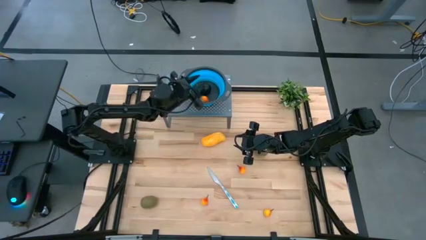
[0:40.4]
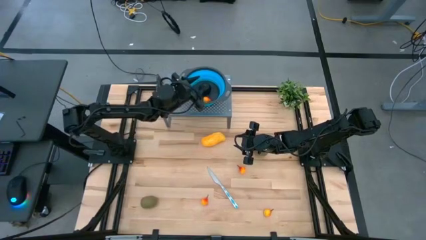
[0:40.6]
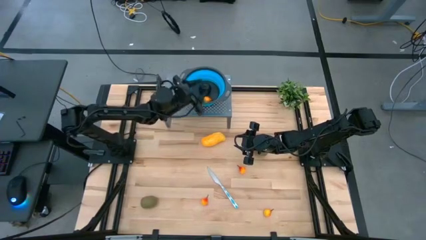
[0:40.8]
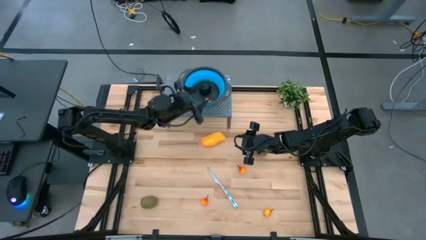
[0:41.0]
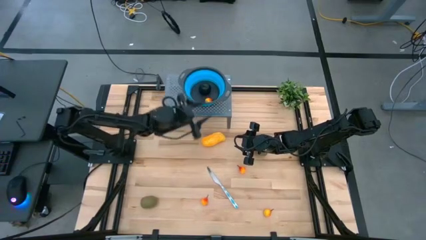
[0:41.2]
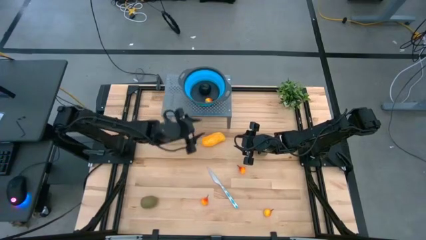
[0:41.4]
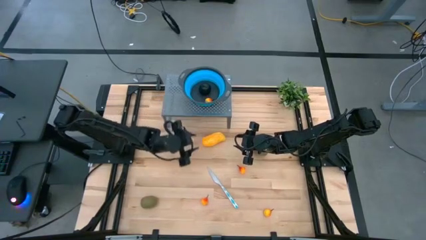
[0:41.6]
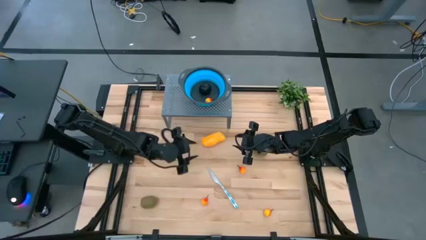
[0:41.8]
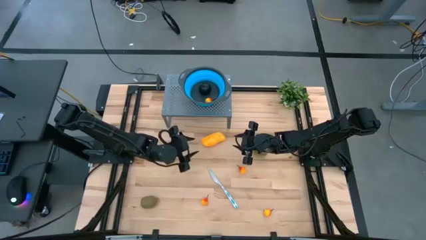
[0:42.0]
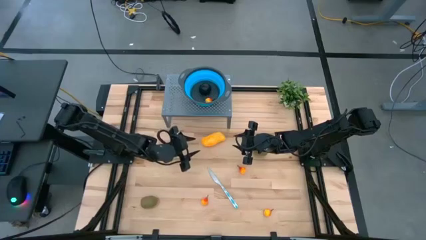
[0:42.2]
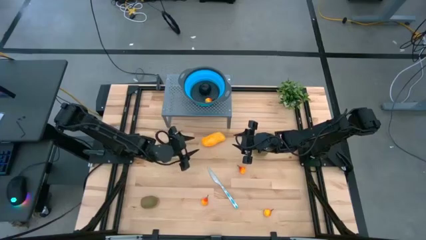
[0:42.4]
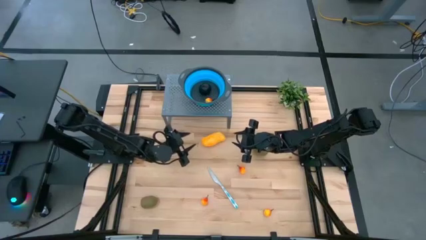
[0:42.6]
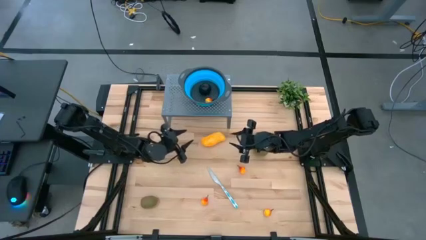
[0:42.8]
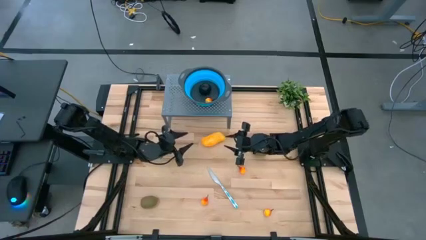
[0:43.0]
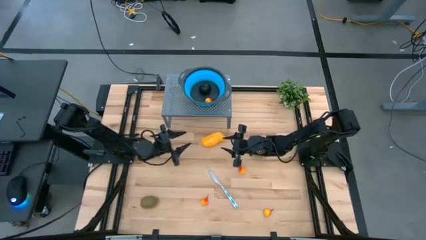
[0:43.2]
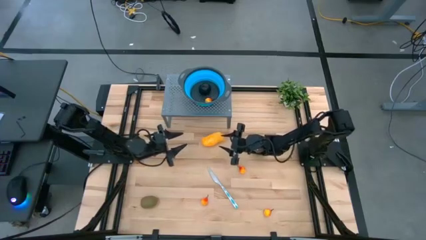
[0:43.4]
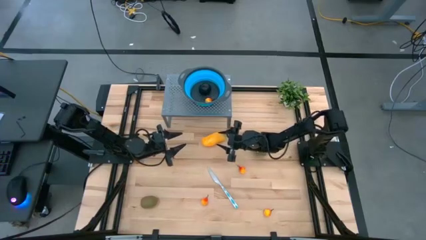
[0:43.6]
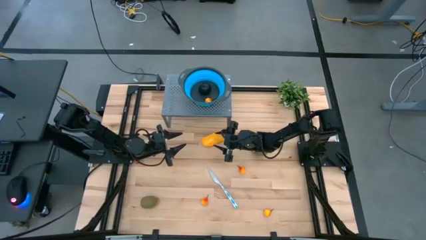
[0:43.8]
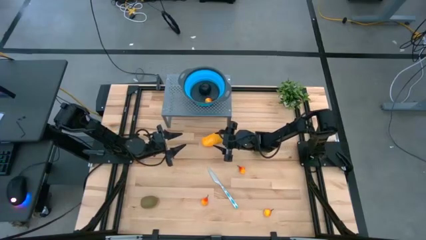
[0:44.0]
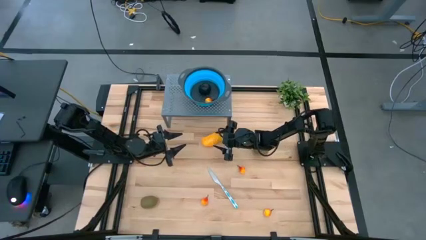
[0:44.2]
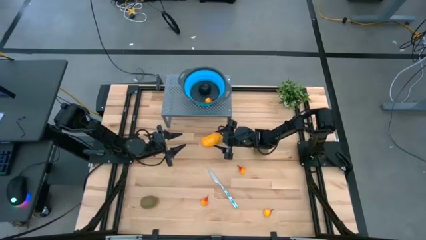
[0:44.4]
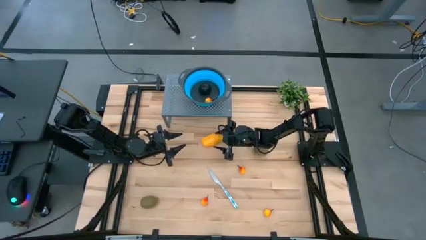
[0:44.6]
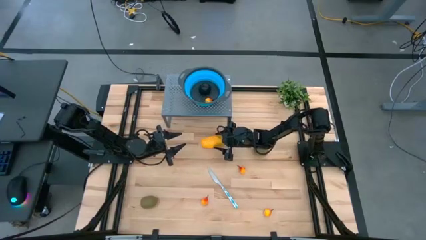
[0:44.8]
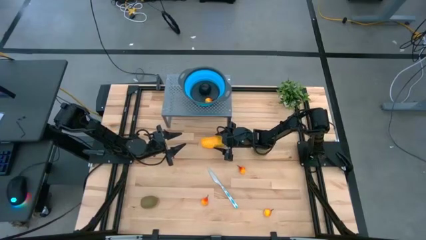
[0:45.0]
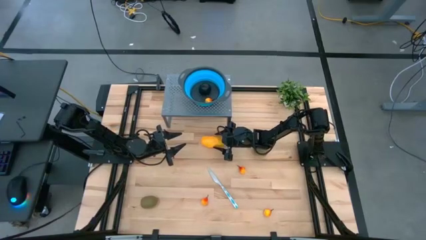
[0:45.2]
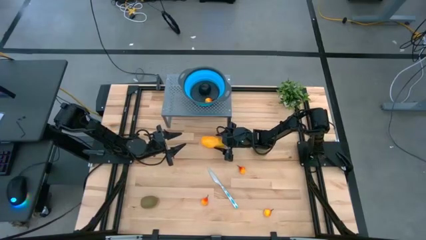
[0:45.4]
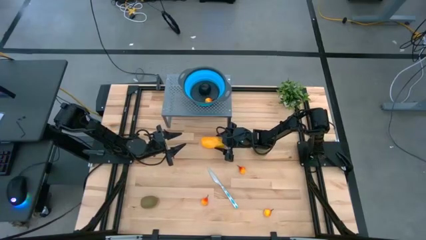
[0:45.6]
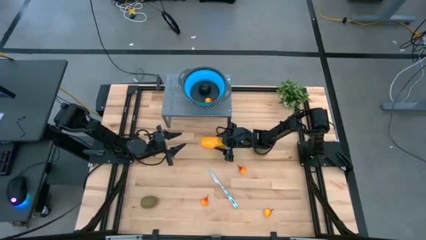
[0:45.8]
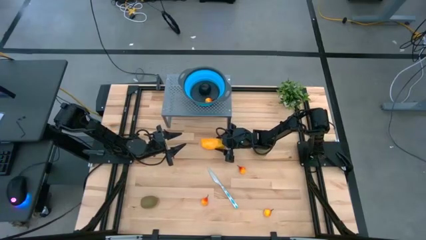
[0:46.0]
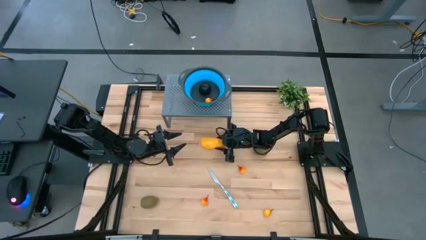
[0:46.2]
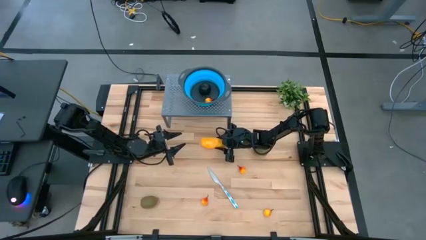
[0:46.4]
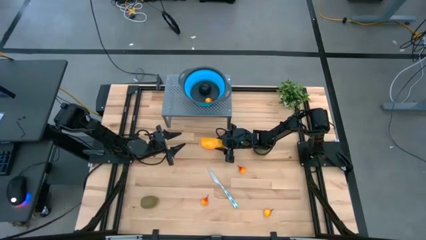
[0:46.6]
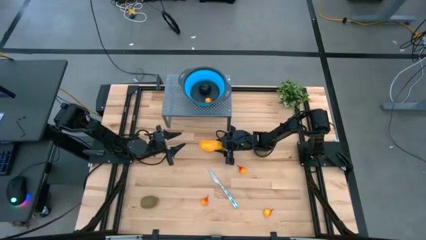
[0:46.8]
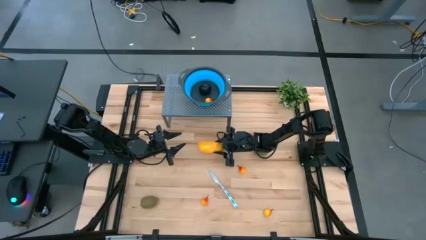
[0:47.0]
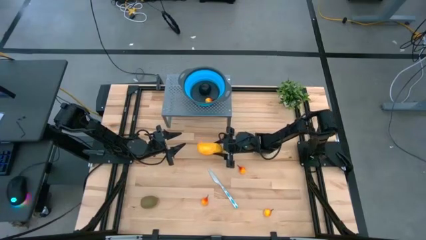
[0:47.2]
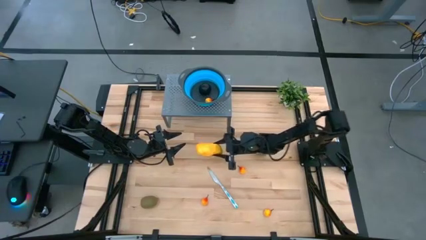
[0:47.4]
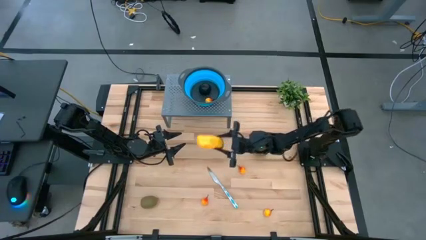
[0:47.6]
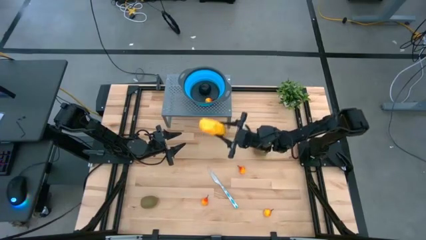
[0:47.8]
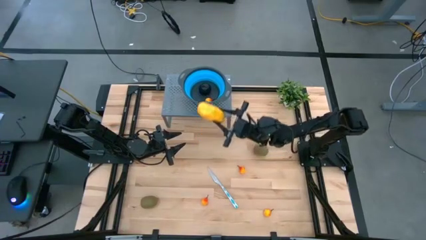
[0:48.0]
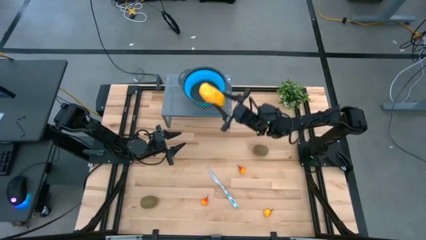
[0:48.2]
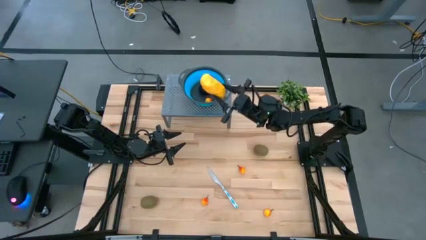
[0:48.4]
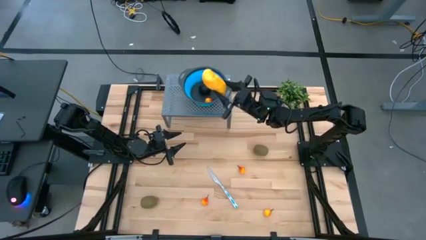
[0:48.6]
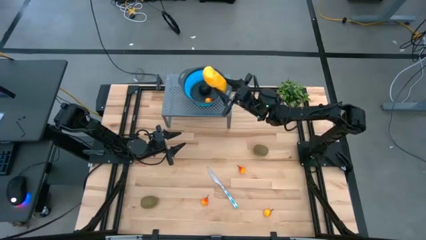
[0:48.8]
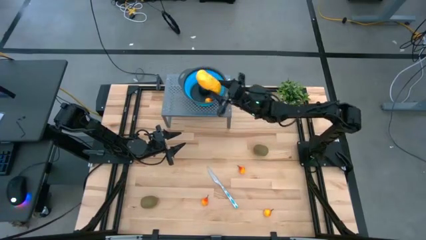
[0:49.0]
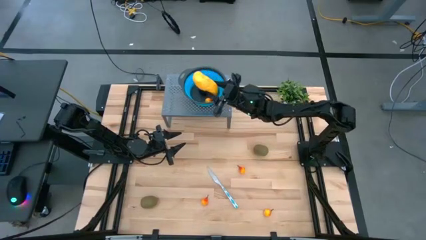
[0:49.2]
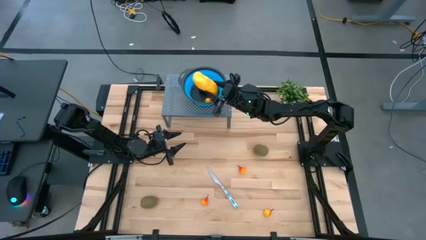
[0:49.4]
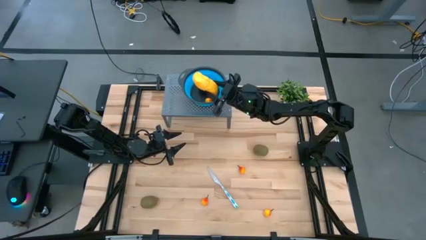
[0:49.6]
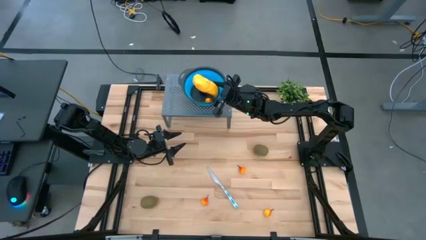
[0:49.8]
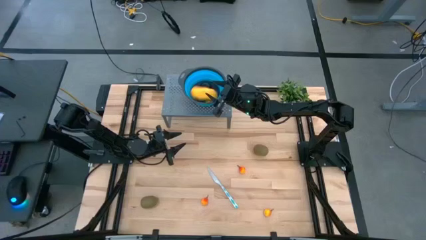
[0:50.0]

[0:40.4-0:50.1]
Task: Pick & Place Fruit
Put the yellow mango into the blue strainer bowl on the shelf

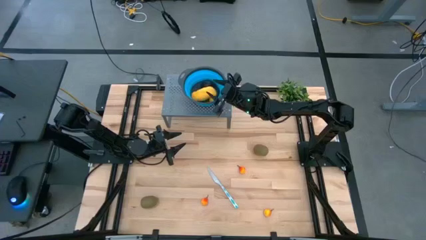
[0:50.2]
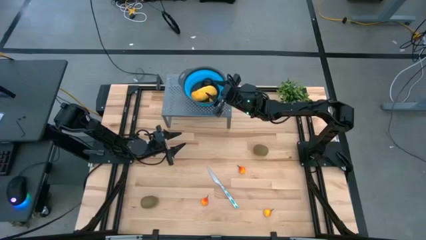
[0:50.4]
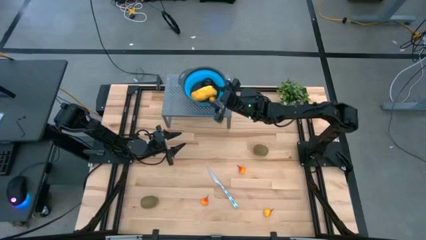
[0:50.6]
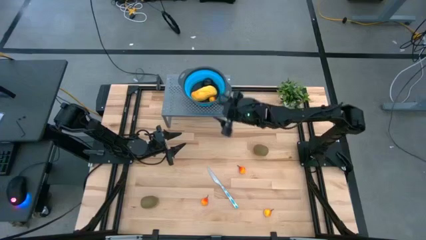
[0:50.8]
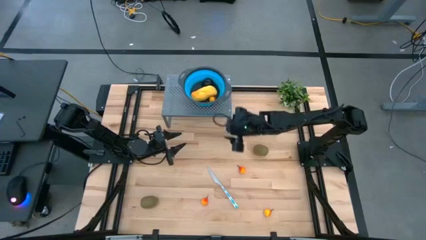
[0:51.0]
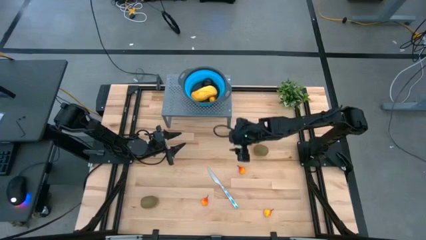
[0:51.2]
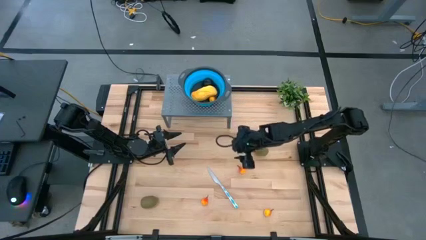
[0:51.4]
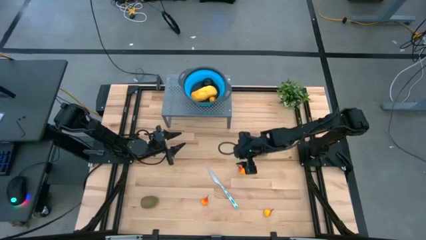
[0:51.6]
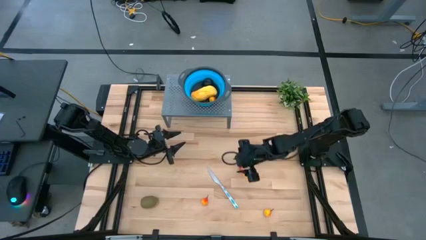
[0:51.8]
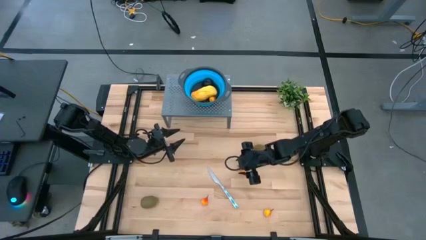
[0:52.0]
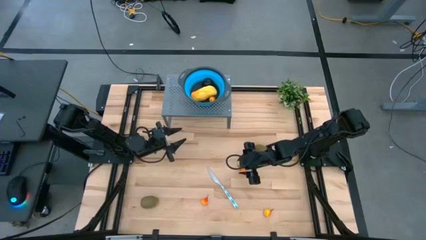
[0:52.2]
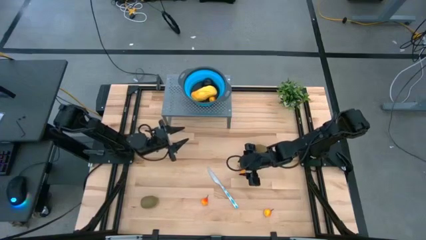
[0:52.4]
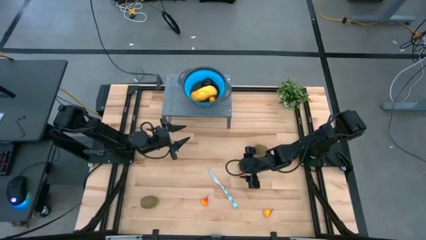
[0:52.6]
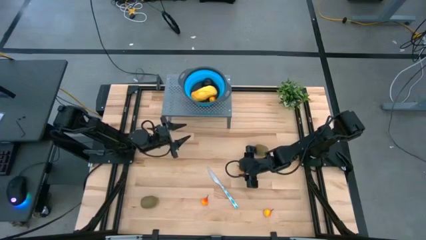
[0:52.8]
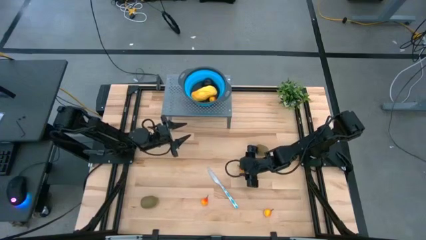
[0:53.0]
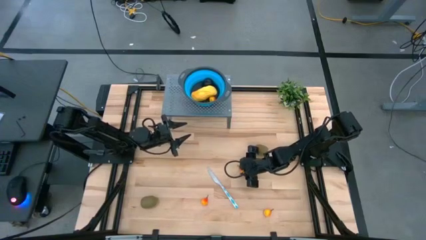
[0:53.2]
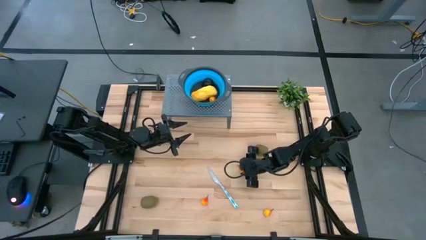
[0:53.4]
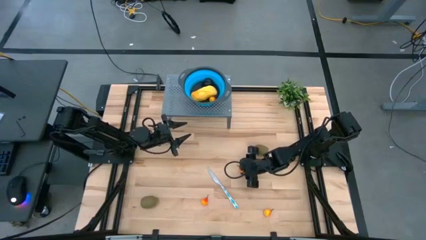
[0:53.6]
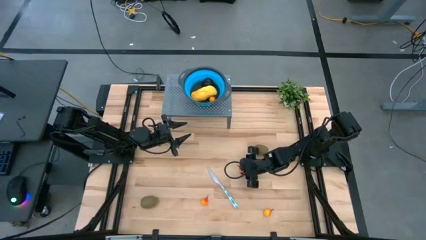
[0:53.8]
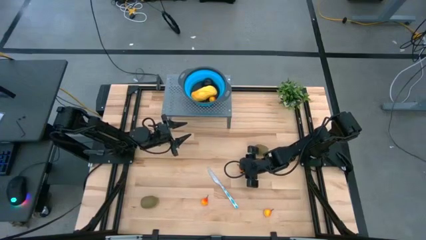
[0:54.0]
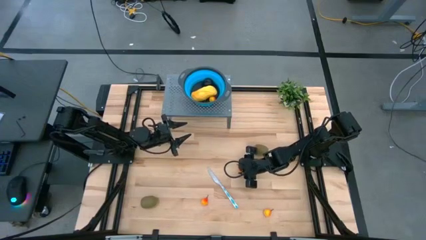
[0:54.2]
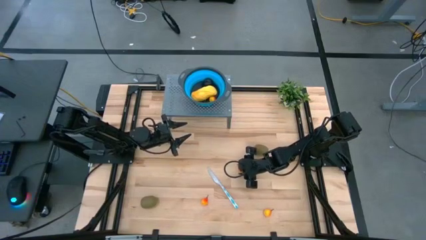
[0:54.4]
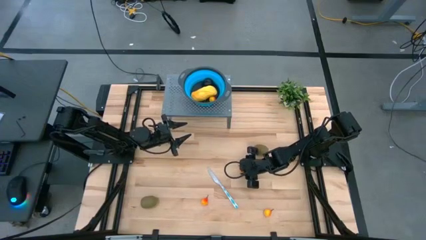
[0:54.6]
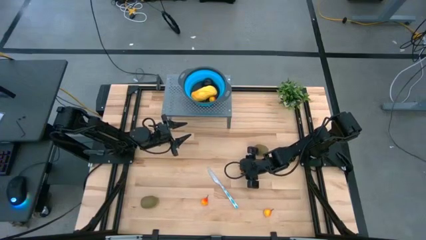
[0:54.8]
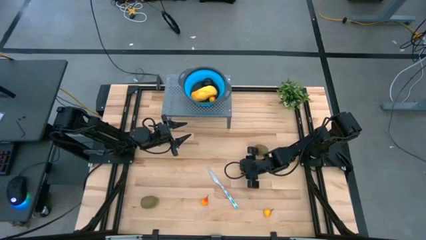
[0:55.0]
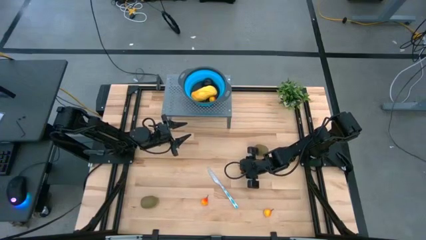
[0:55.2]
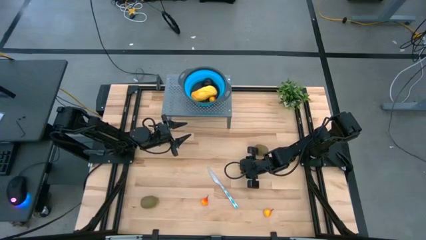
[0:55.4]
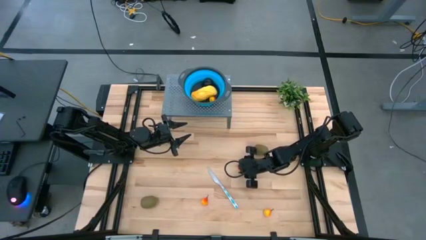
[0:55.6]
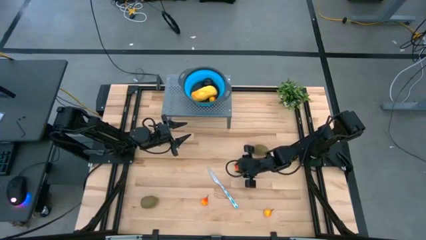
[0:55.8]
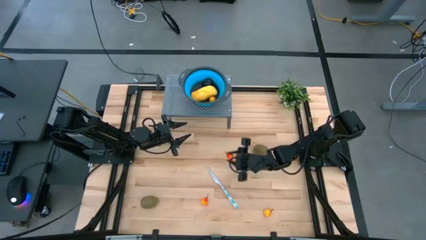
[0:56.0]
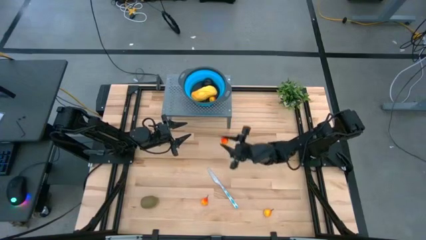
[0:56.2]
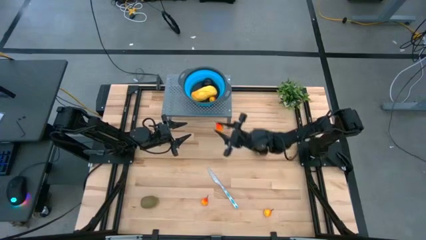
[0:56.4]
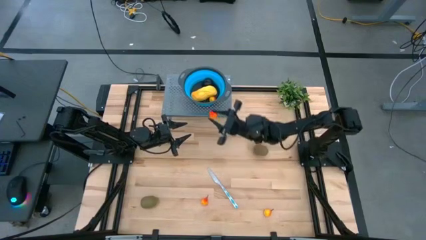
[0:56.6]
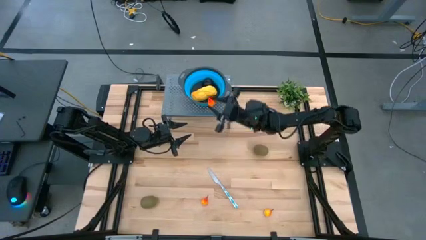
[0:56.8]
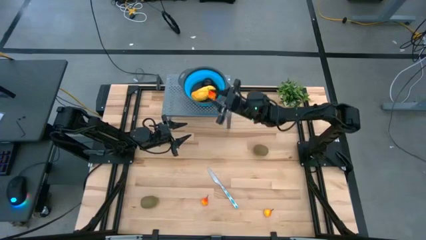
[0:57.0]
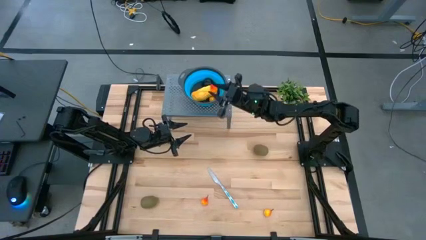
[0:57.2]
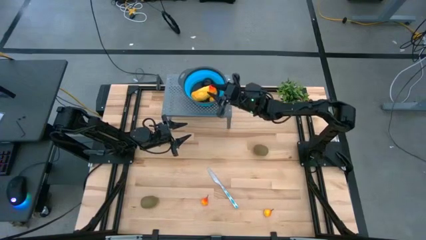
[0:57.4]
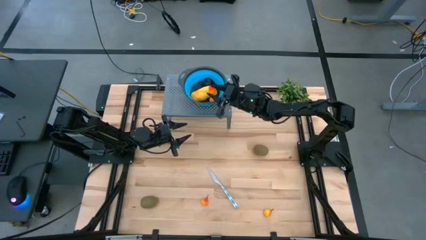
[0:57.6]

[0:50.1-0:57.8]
Put the orange pear into the blue strainer bowl on the shelf
